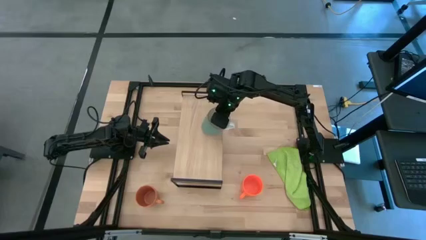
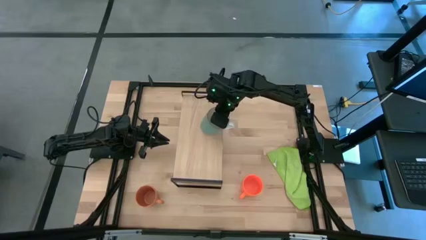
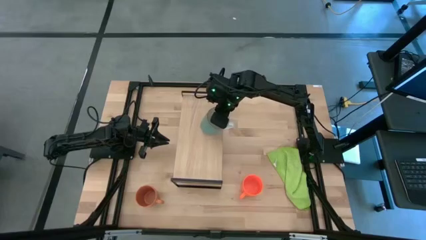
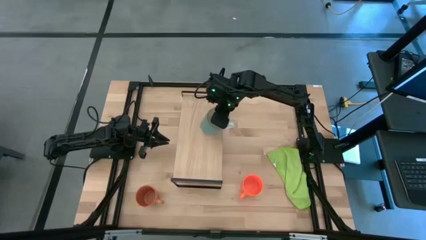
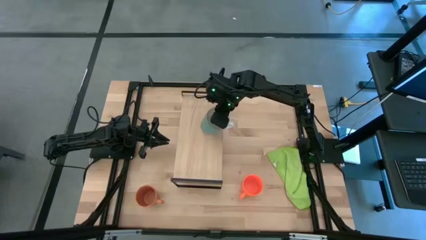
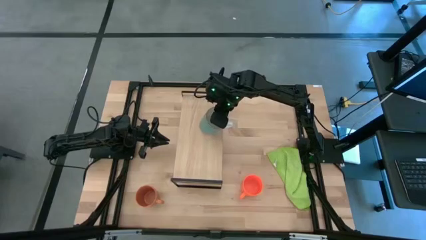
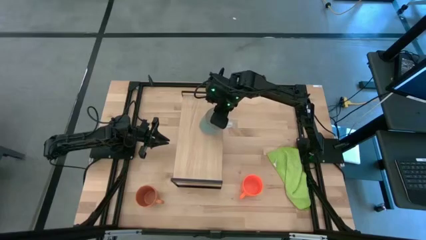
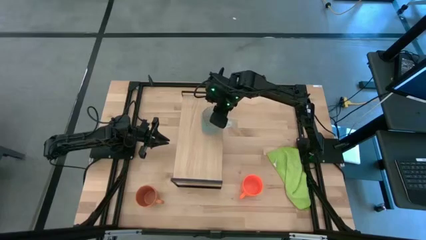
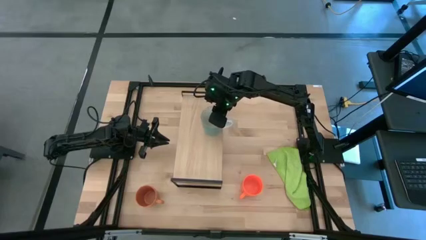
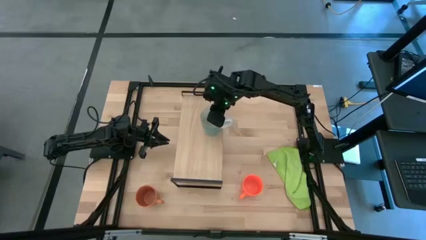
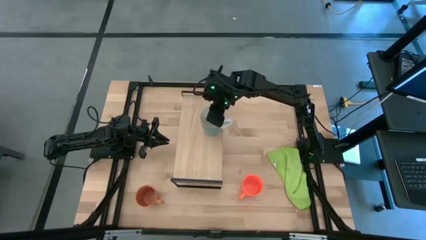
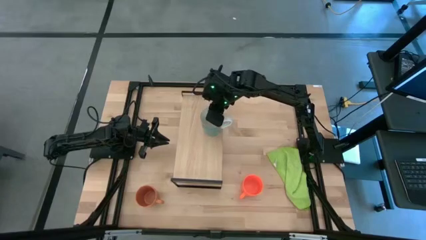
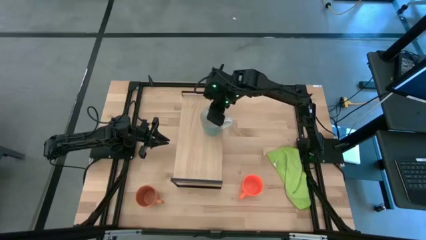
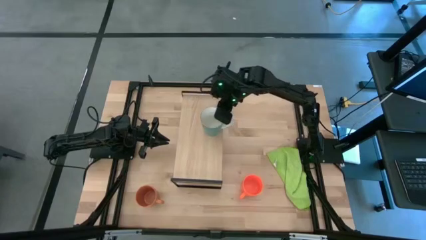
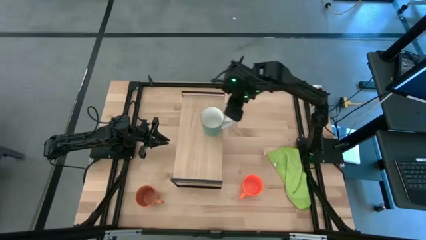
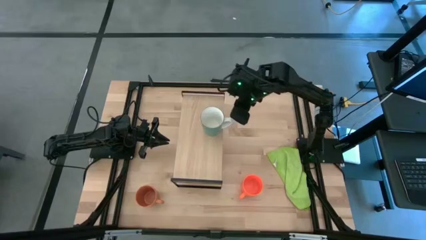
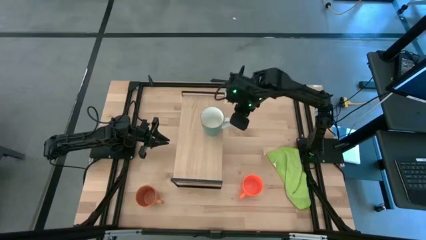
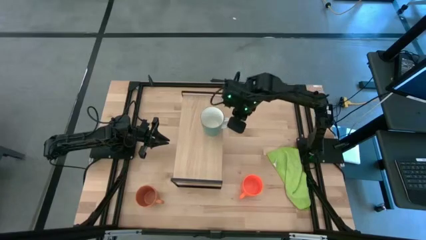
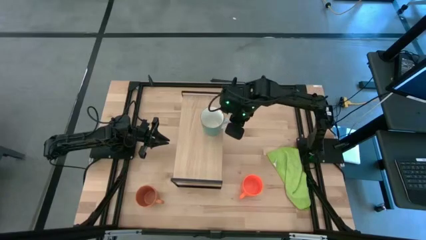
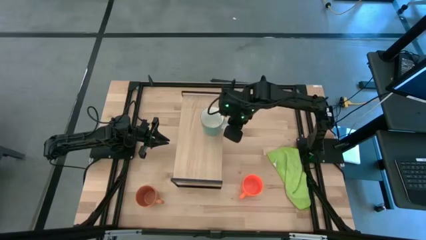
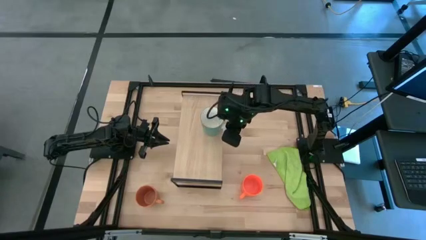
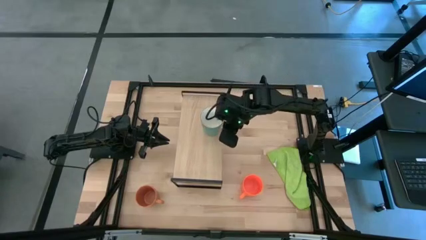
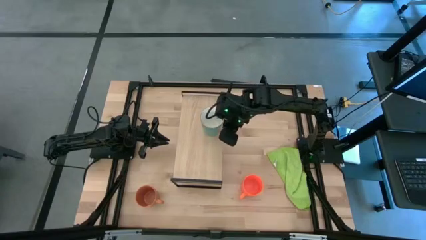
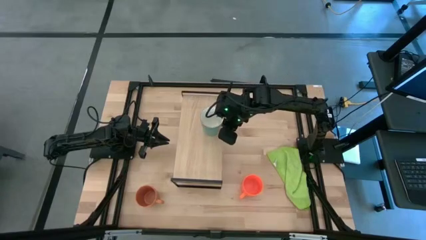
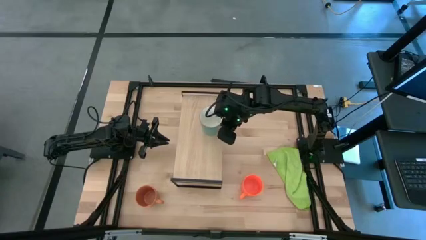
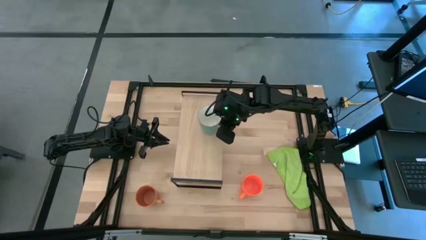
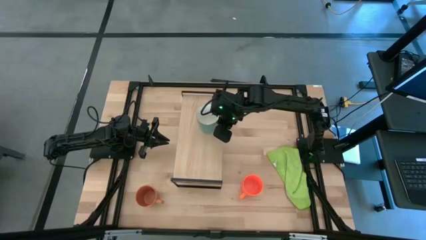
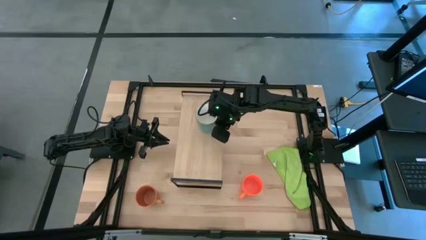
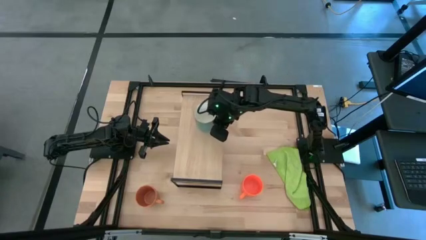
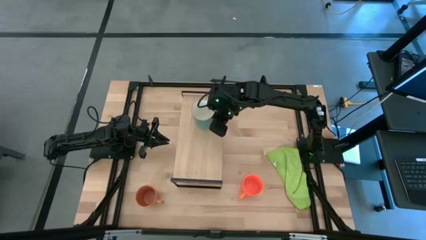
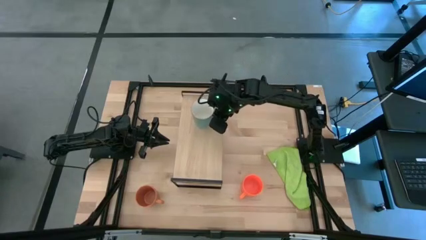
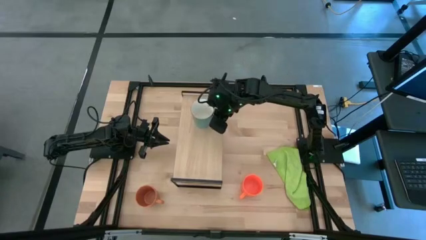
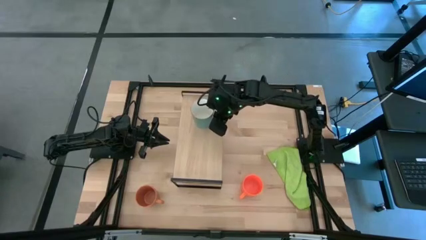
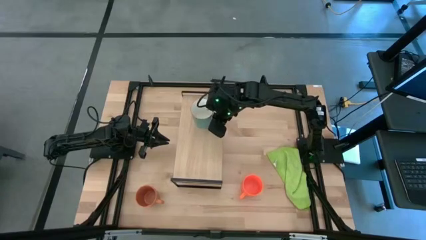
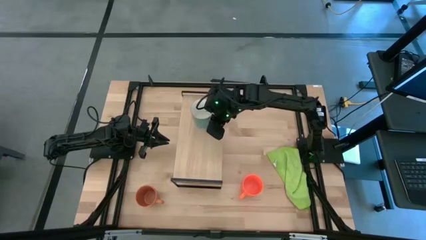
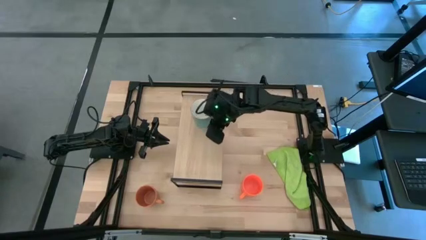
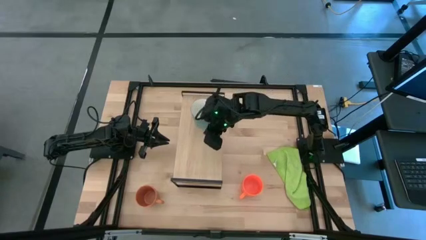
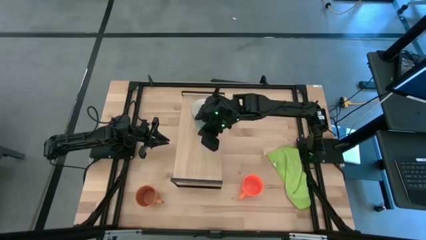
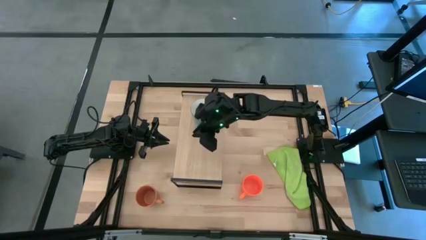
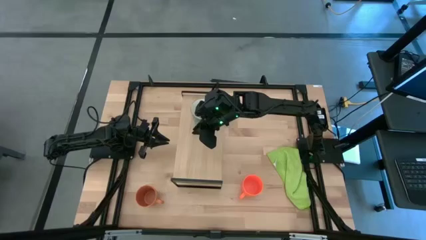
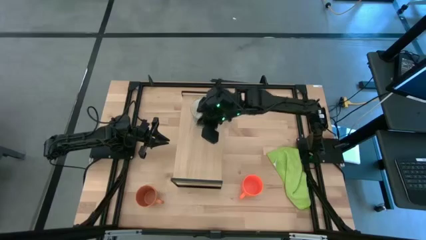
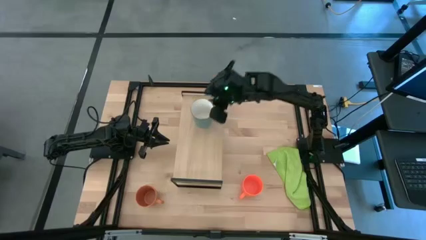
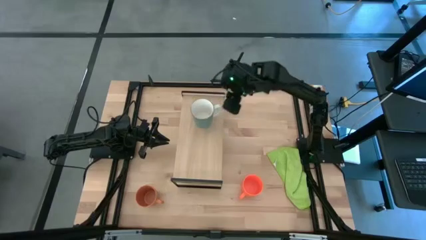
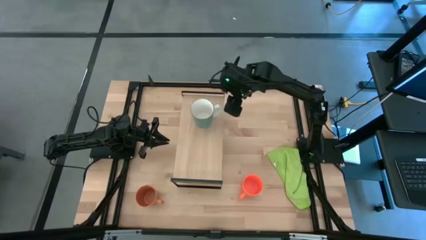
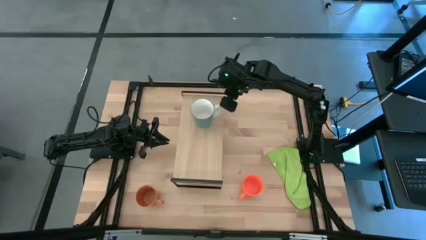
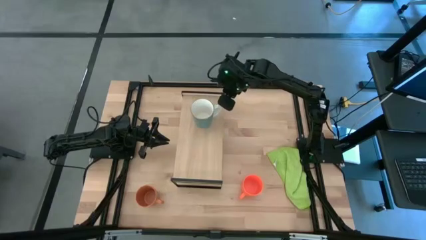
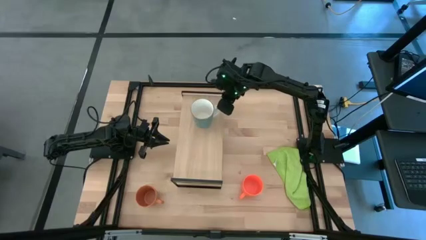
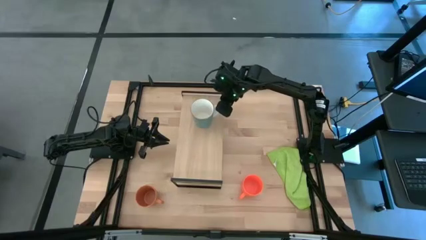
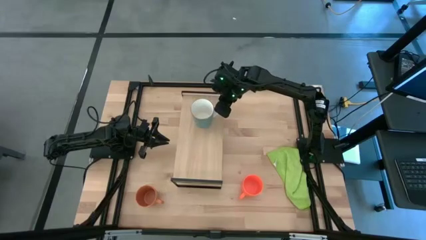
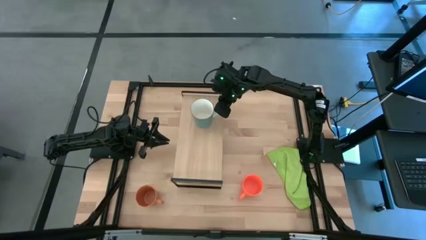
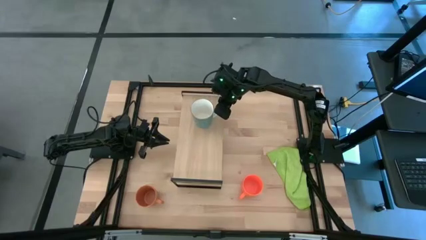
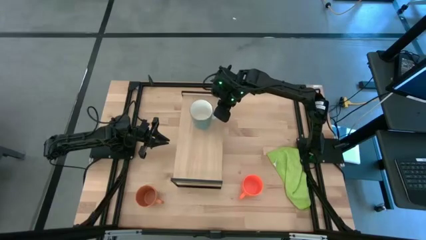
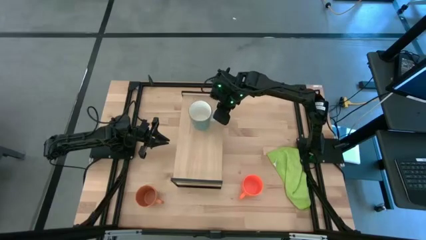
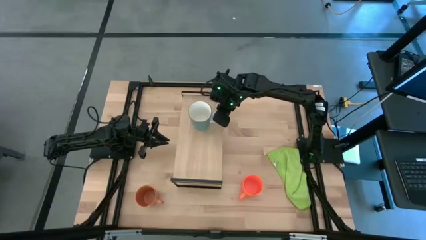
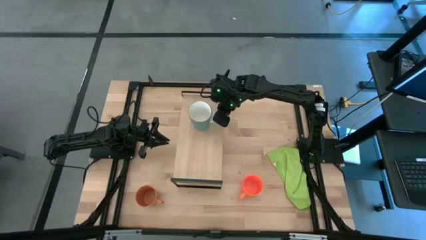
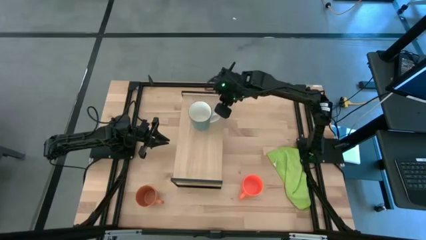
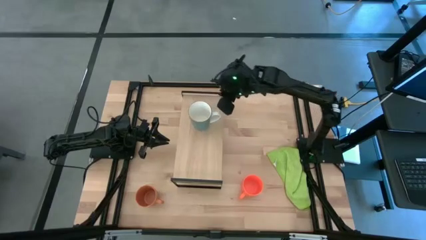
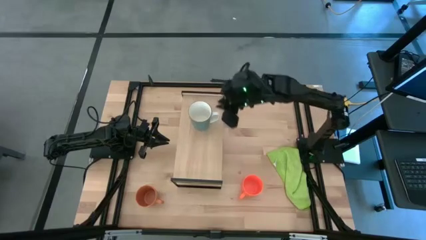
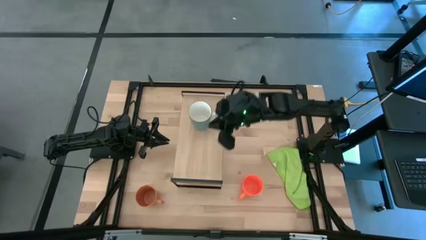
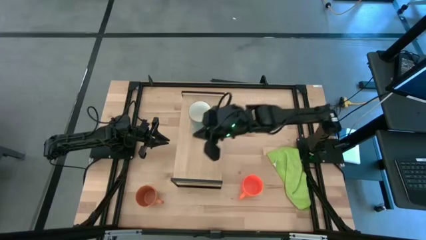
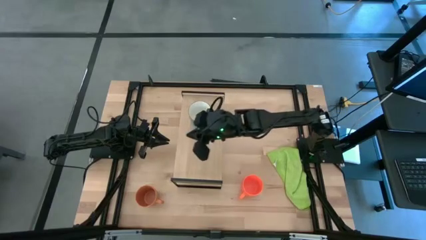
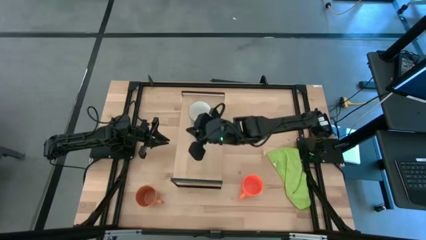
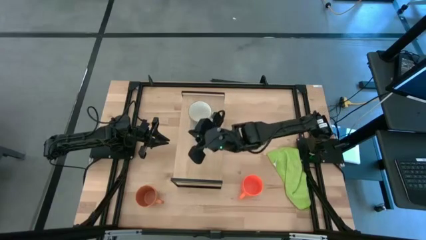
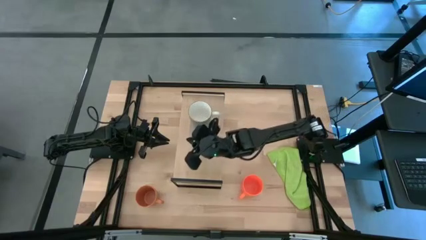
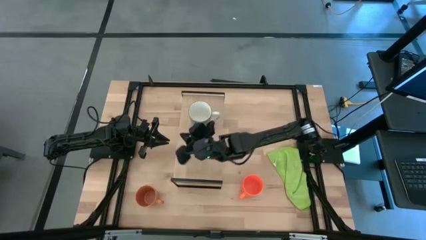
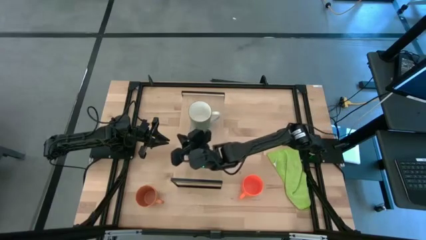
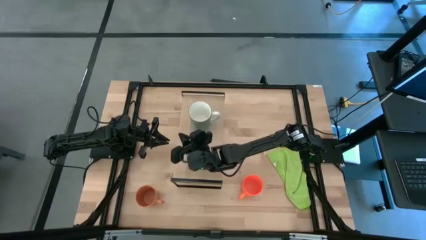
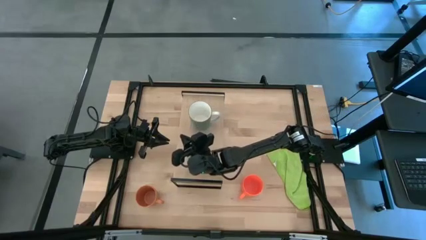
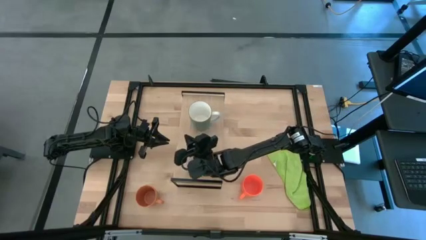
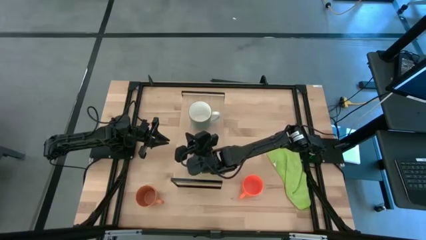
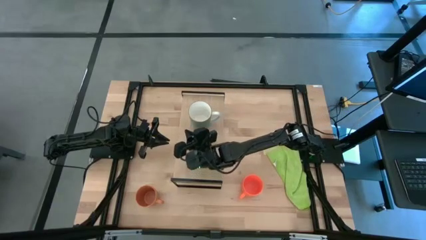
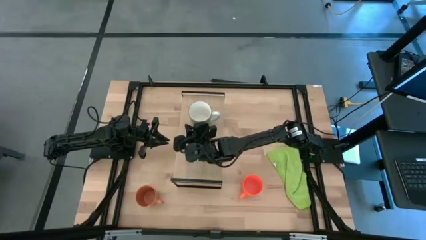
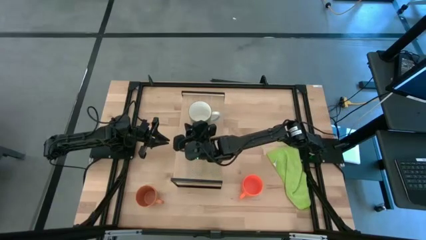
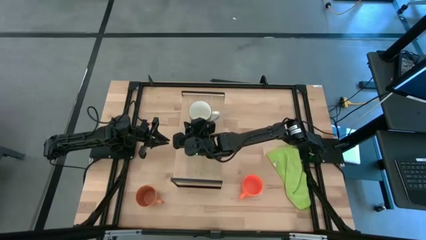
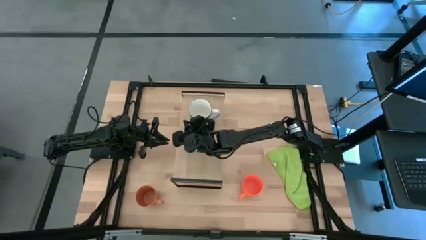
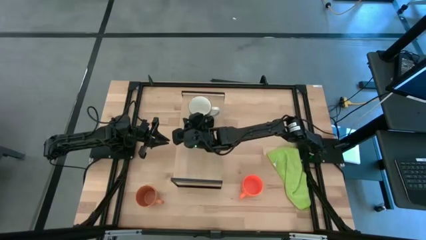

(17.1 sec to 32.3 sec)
Task: Stack small to large cups/mugs on shelf
Put the blue mug on the shelf

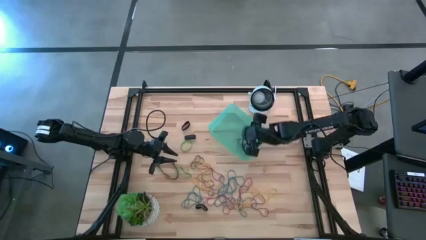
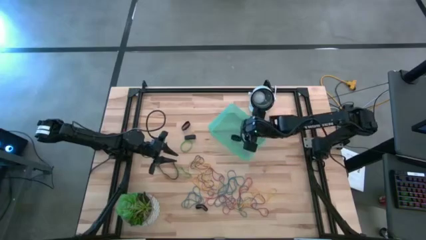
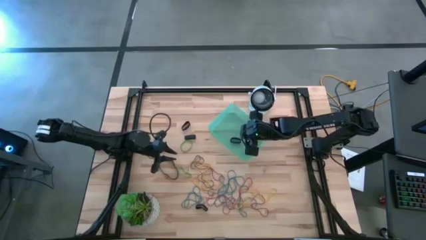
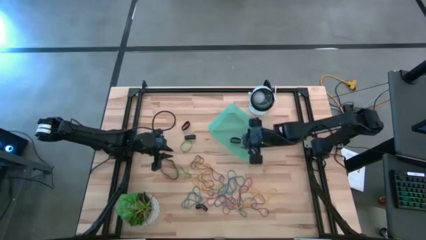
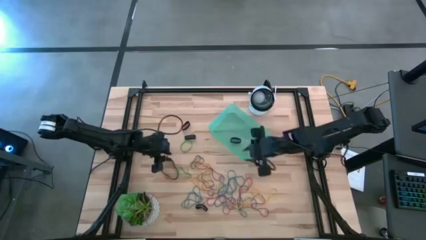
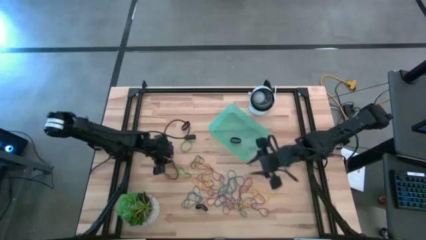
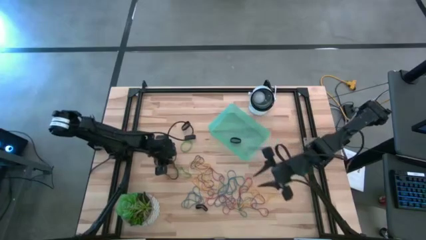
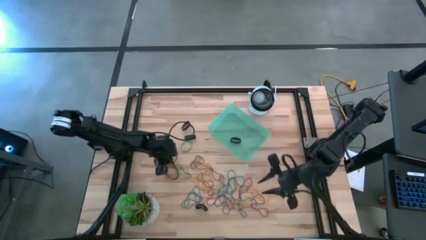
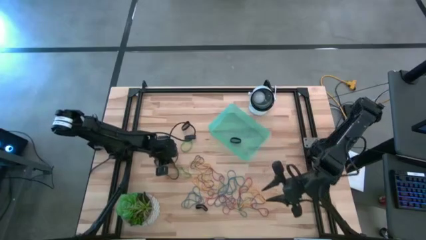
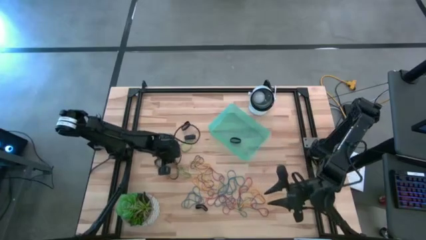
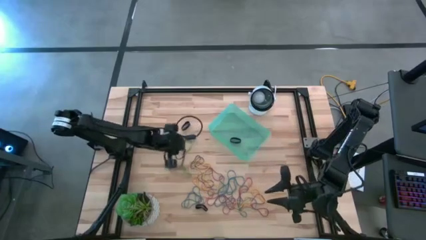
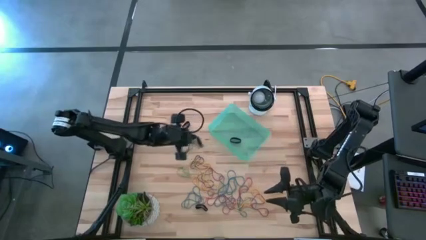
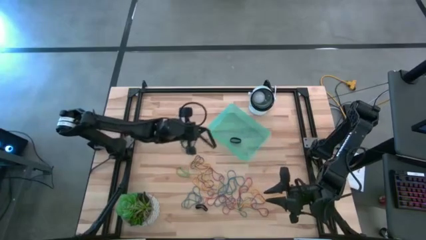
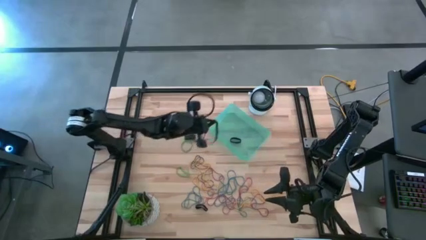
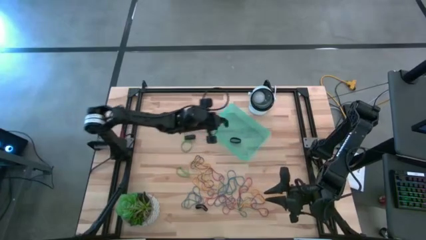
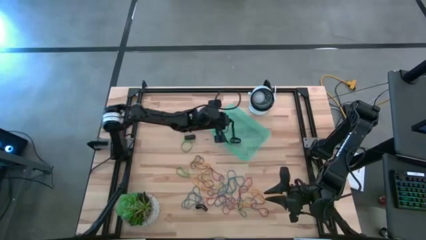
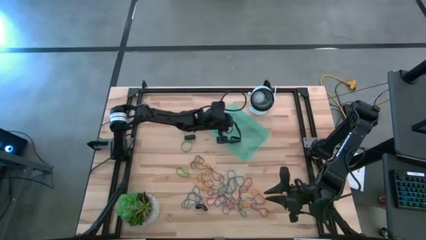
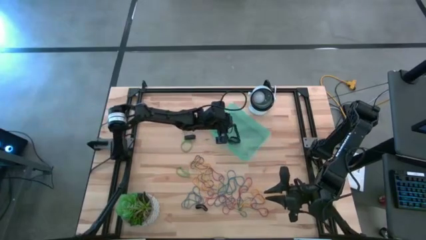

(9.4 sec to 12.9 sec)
Task: Pick and place rubber bands into bin
Put the black rubber band into the blue bin
